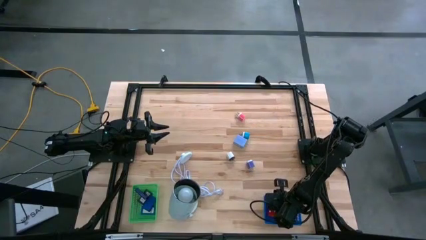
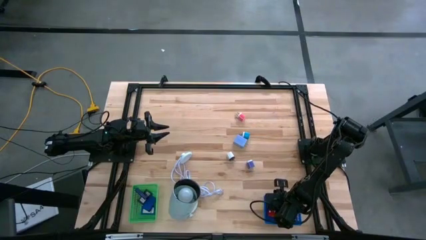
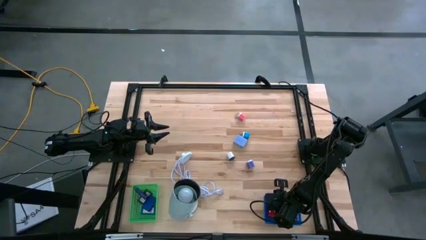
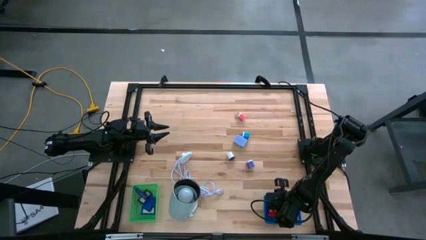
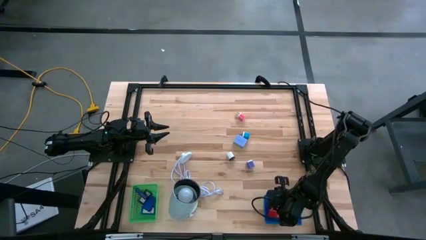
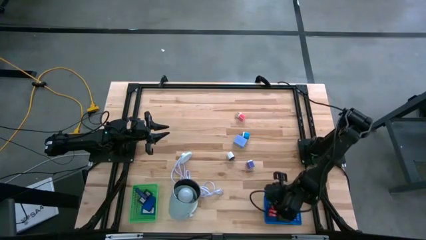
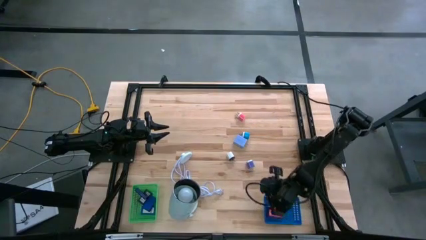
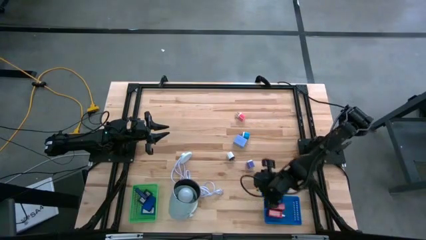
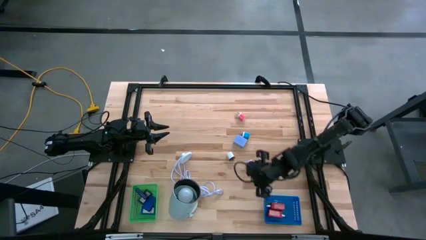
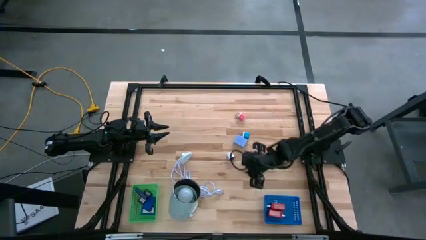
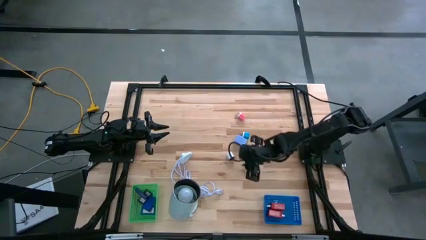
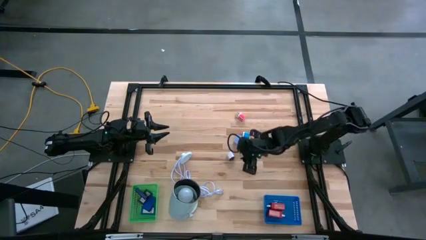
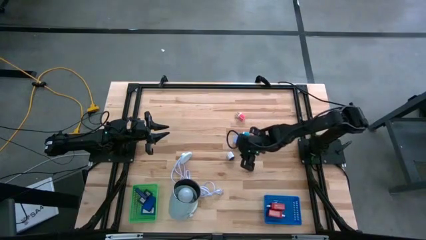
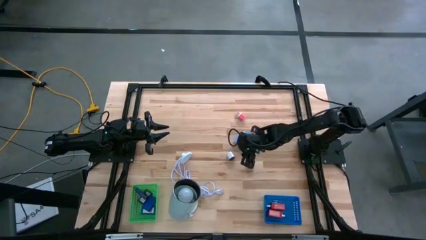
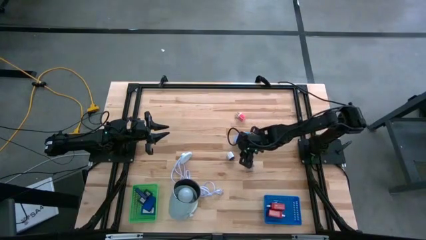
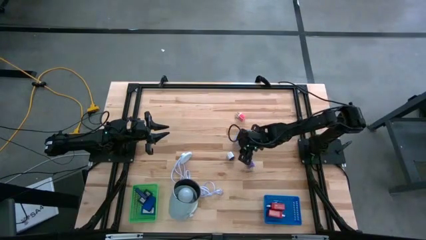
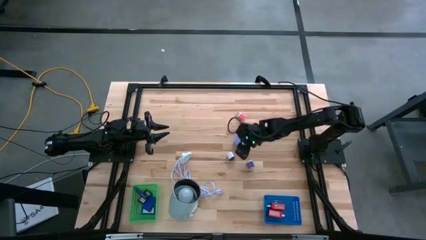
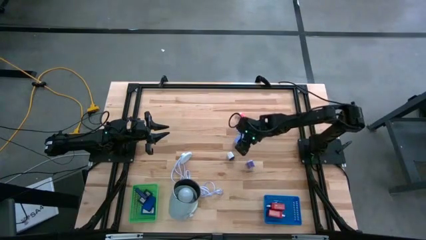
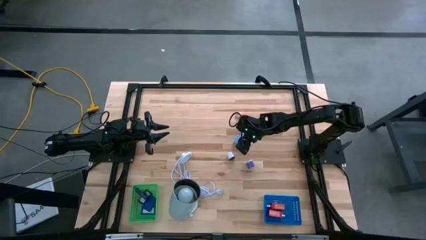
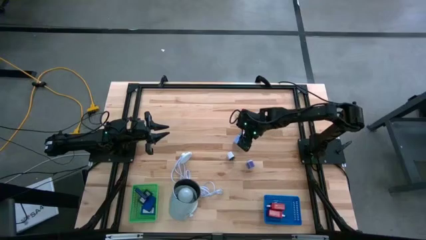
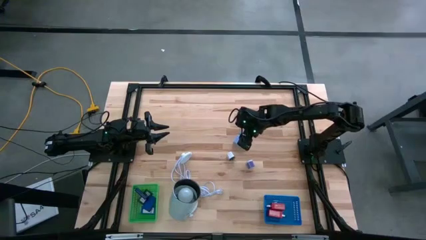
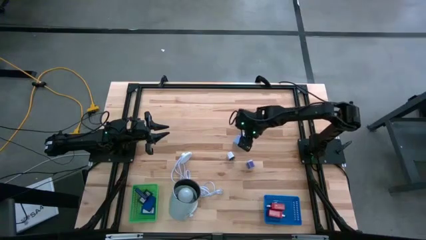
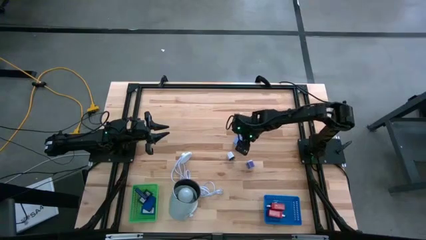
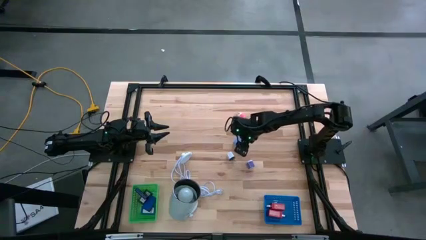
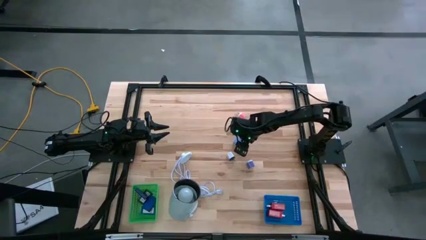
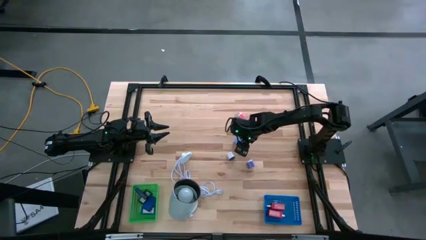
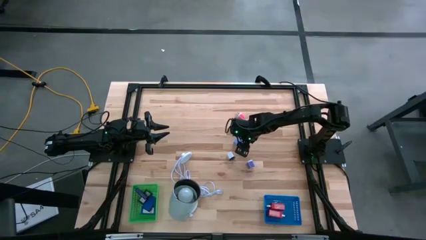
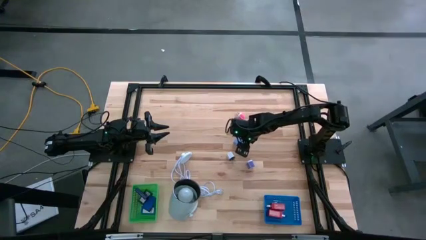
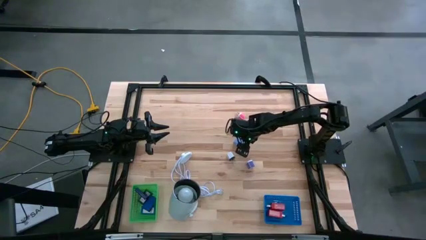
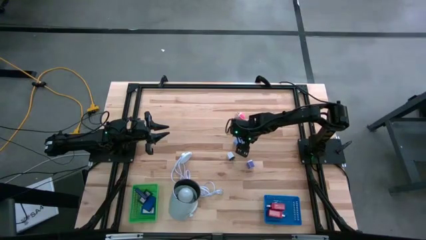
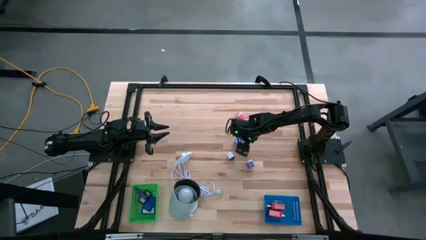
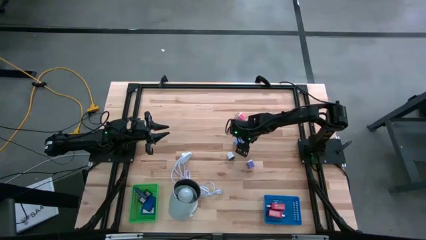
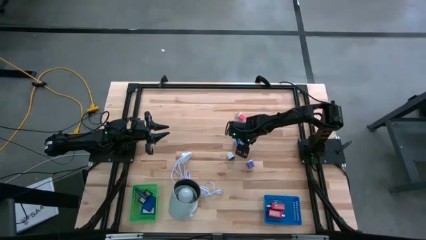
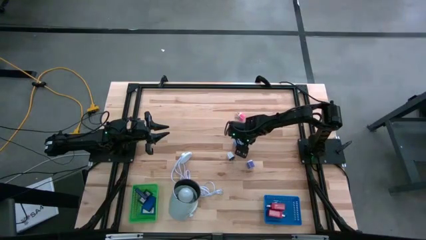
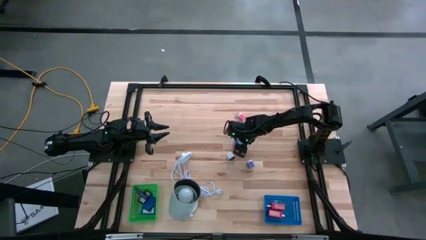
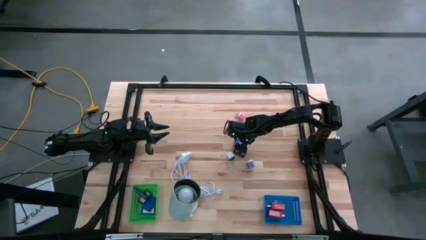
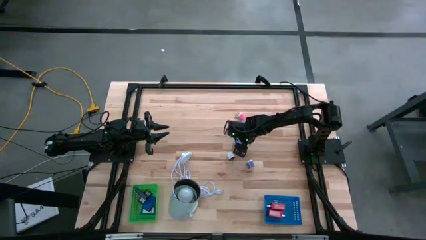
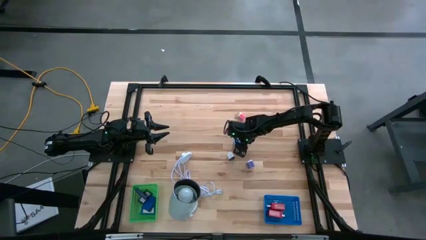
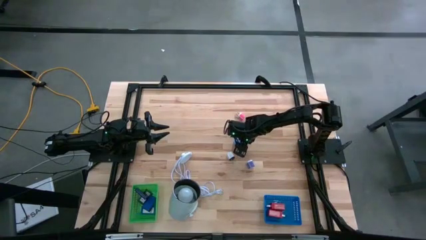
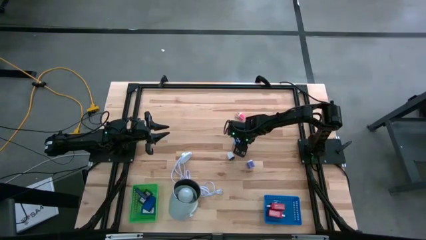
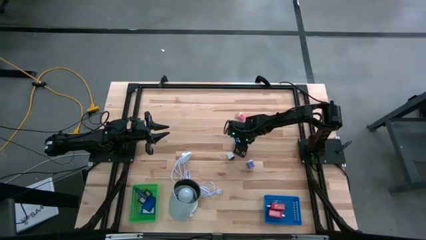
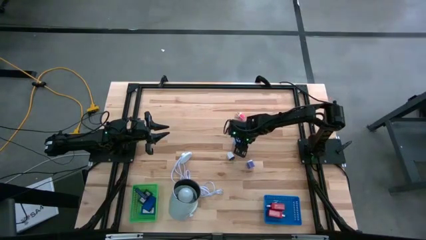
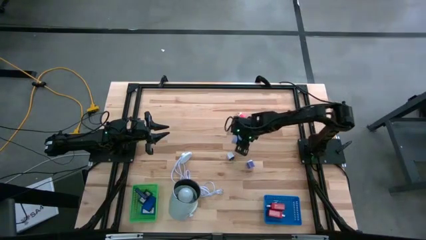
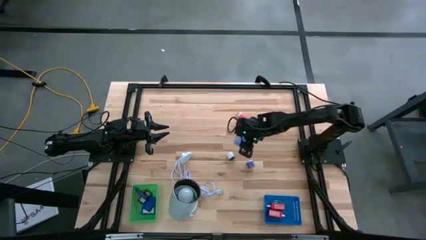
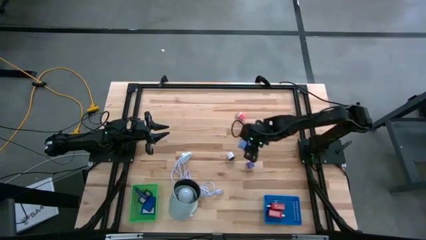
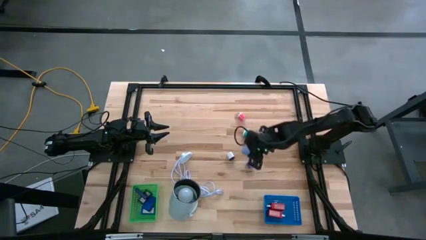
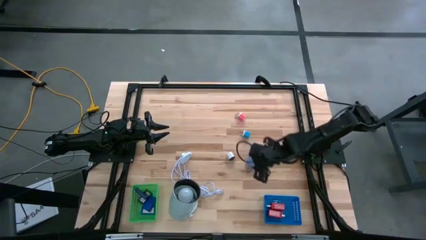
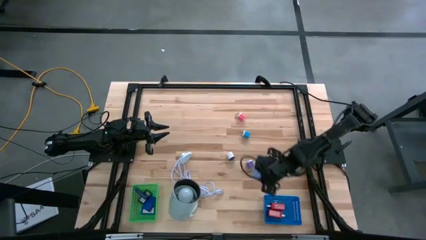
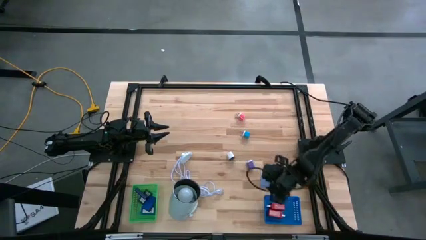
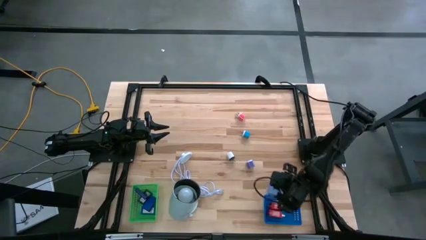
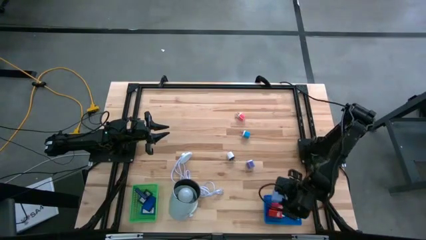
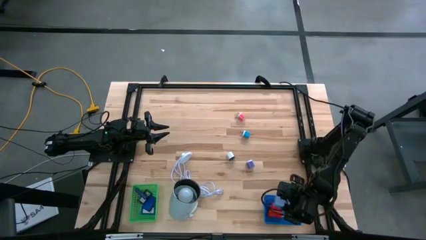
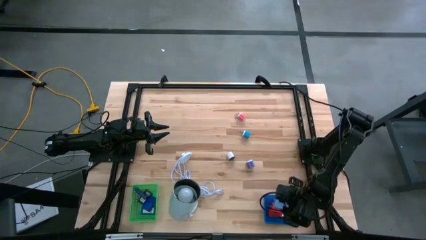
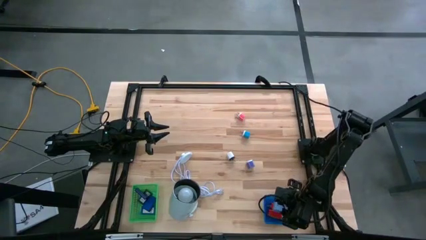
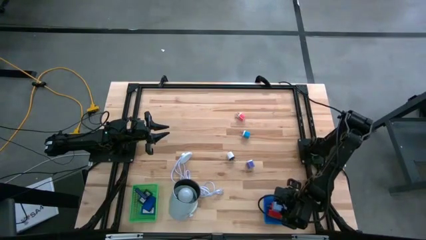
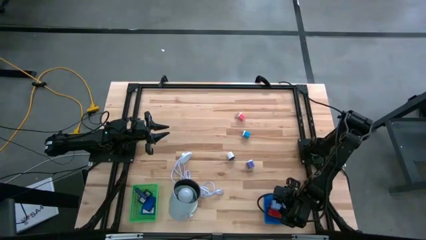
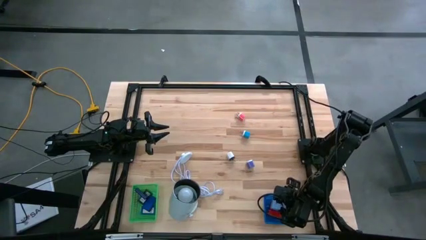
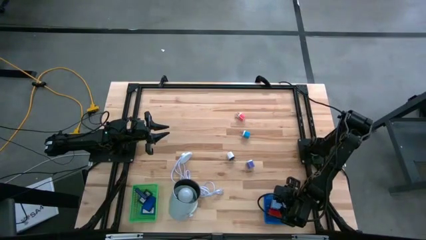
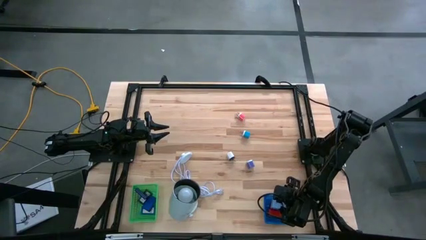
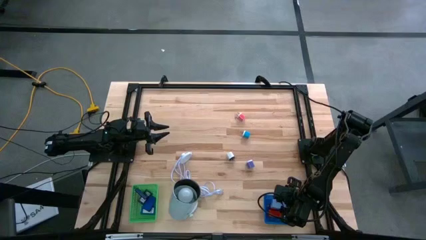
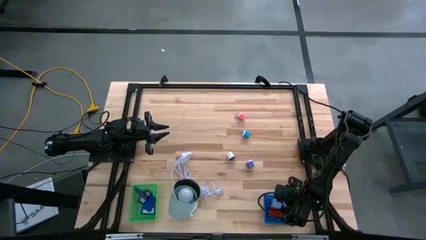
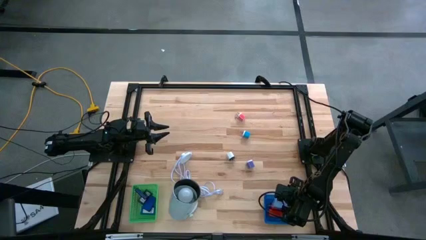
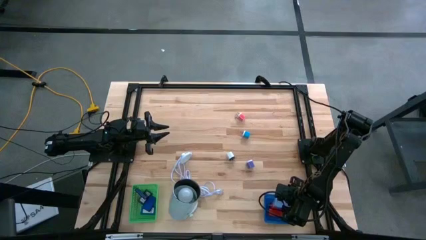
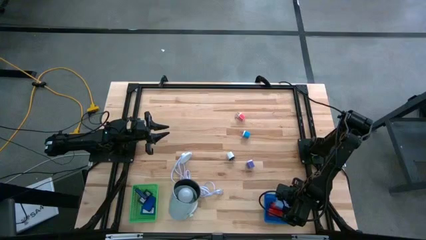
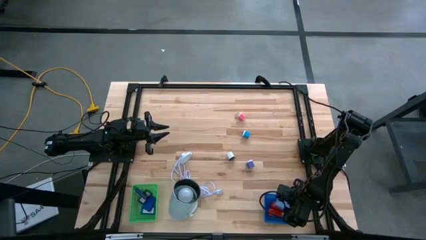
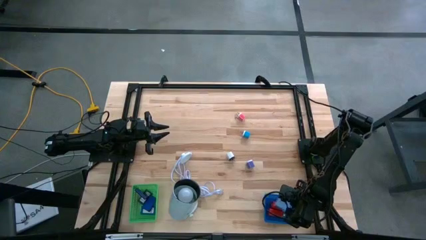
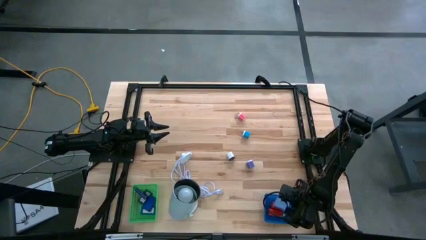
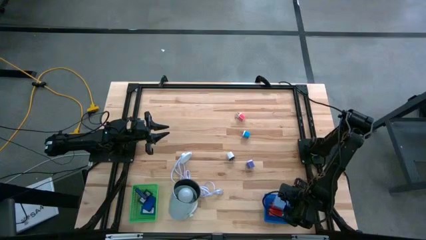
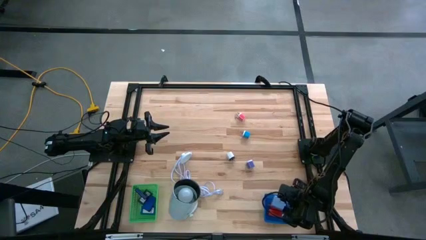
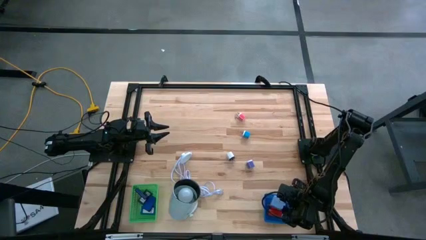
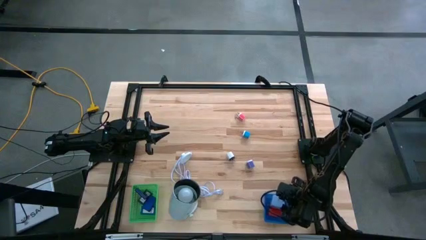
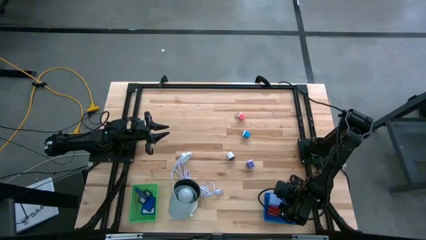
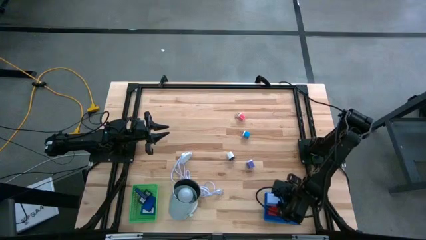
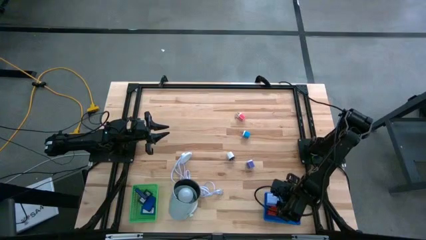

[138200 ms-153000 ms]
Task: Pick & Place Office items
Put the light blue charger adapter into the blue basket

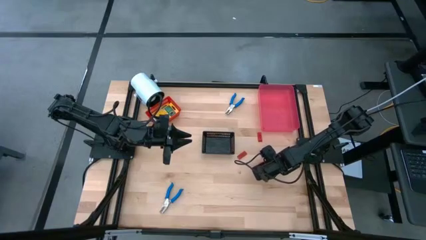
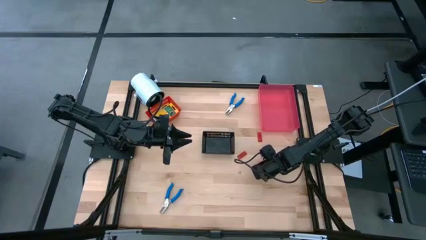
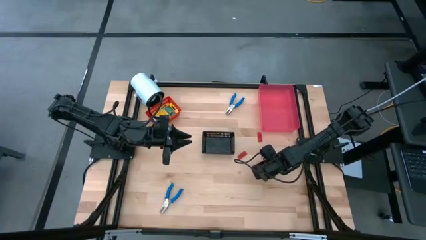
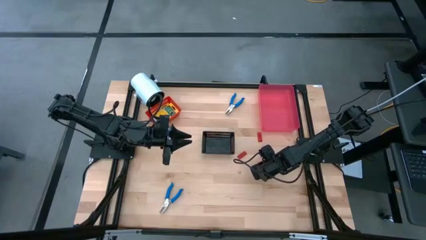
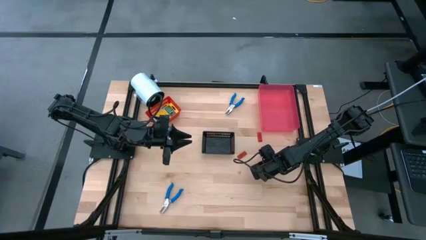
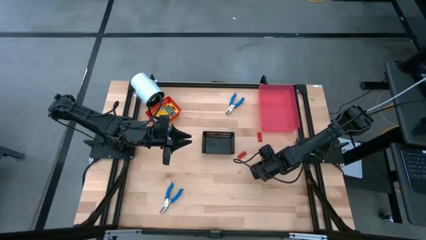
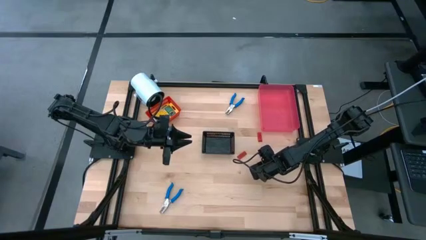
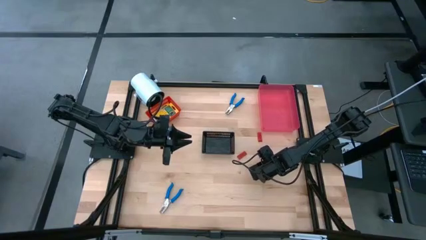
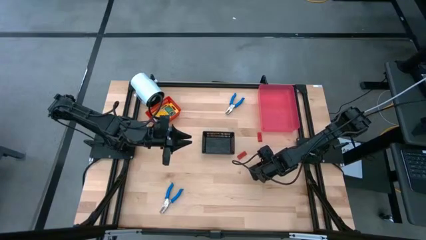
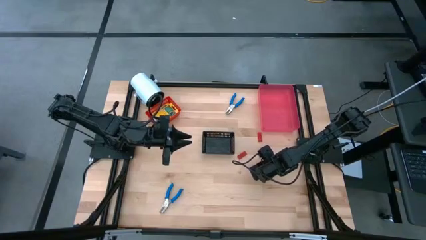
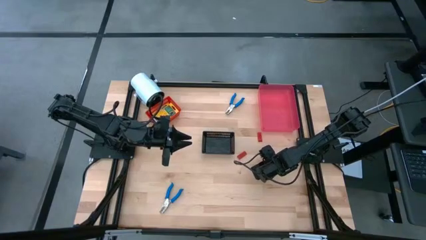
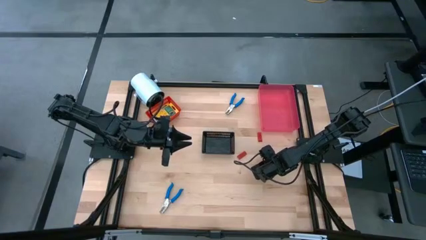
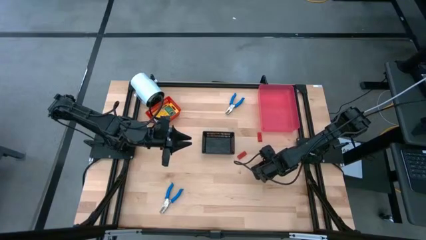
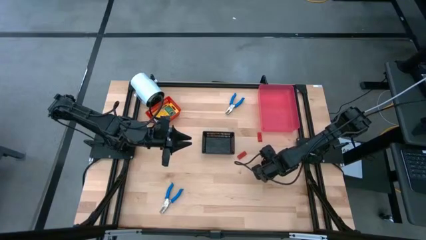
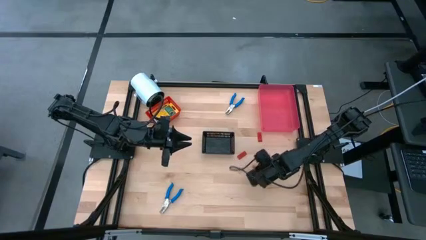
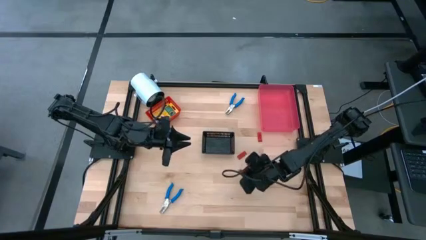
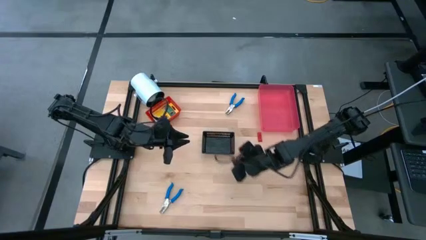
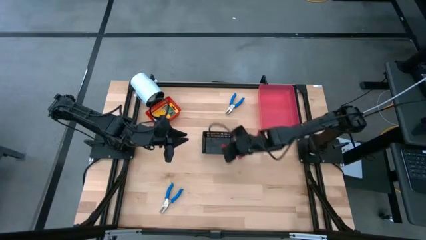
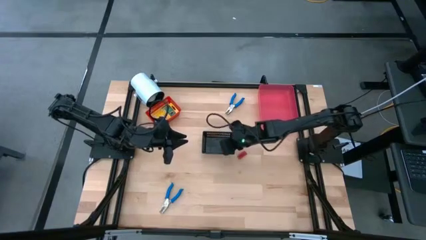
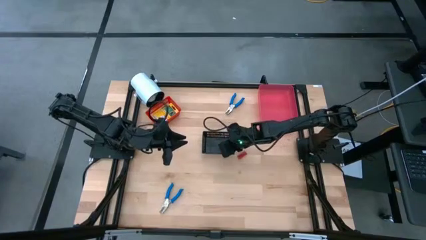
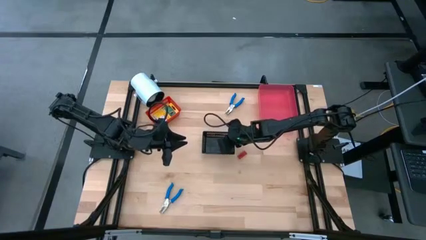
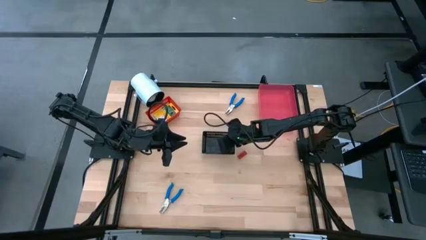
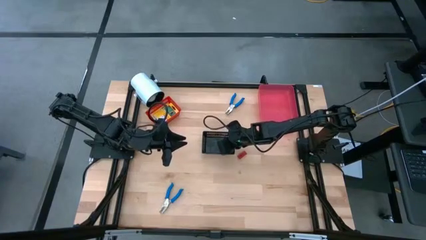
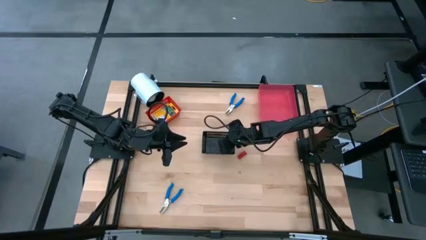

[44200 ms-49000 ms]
Task: Pick & Place School Supplies
Put the red eraser into the black bin
